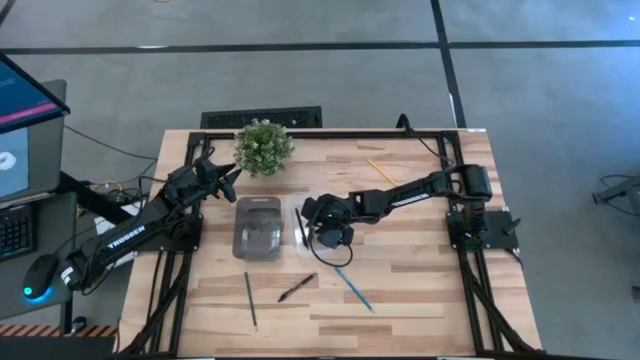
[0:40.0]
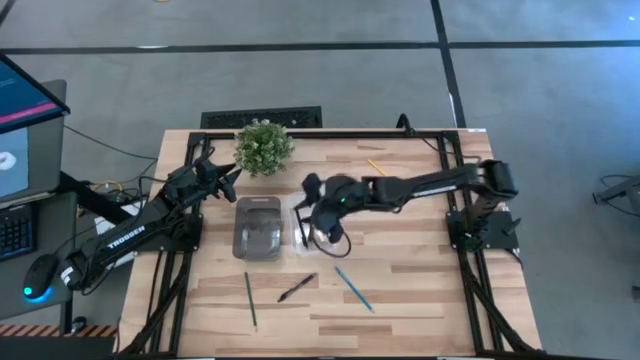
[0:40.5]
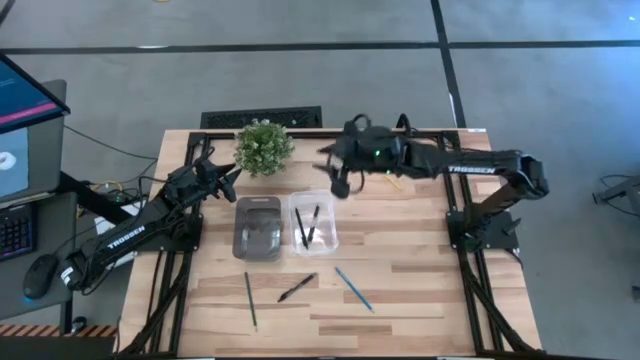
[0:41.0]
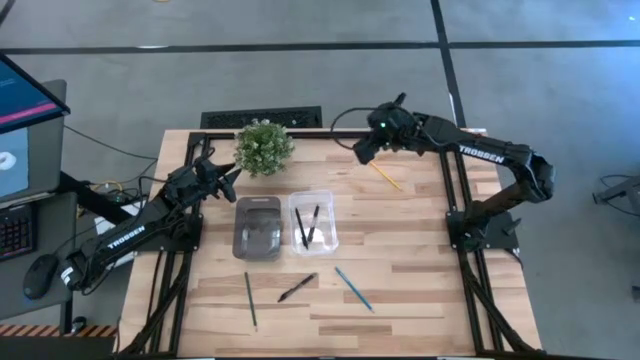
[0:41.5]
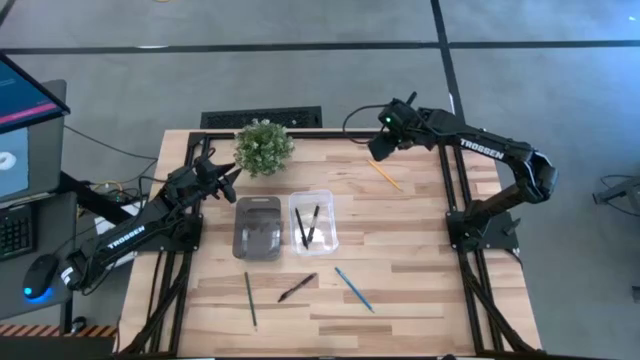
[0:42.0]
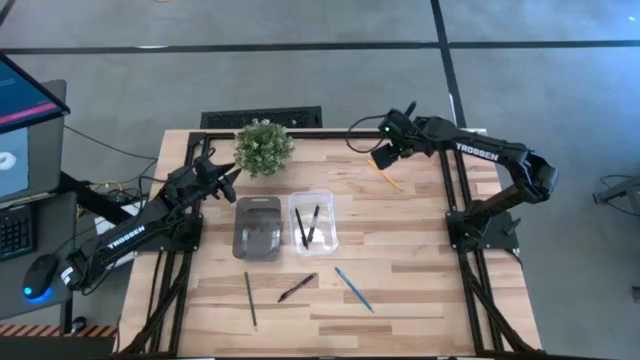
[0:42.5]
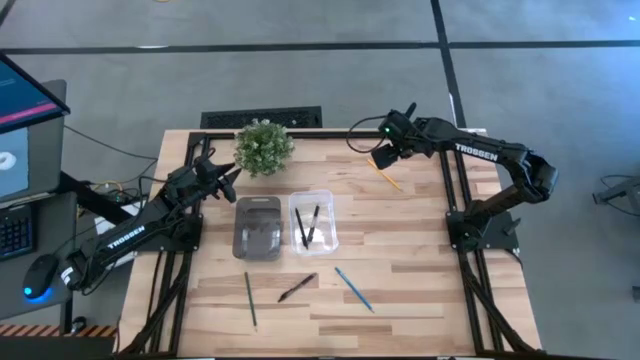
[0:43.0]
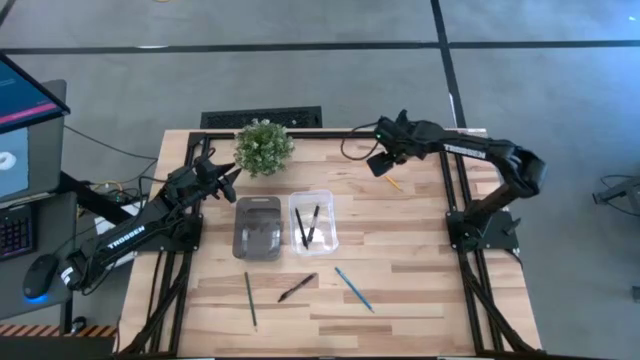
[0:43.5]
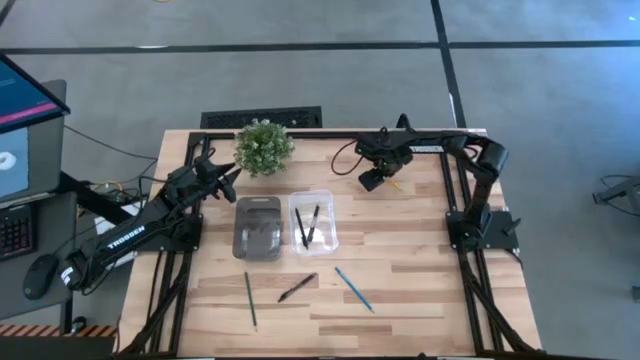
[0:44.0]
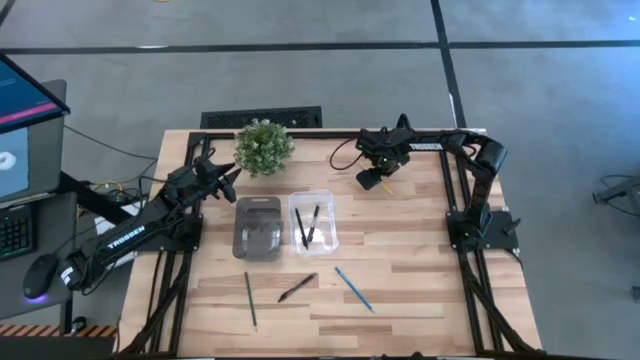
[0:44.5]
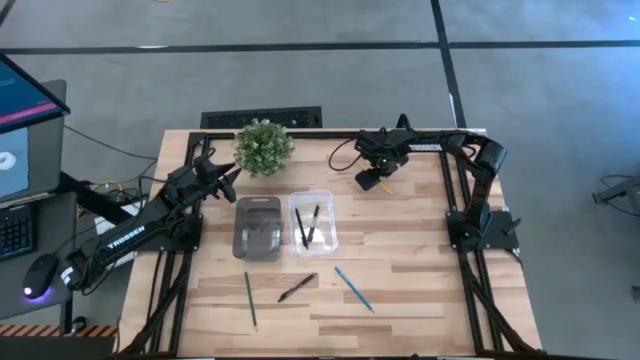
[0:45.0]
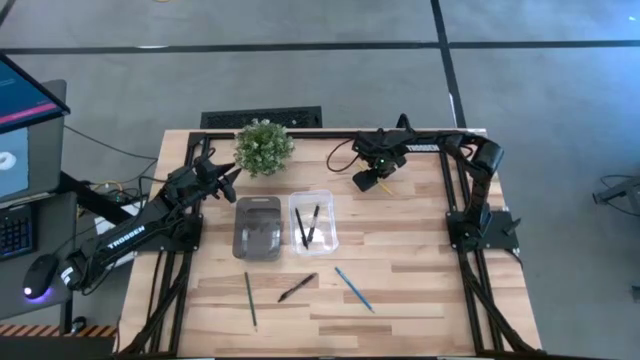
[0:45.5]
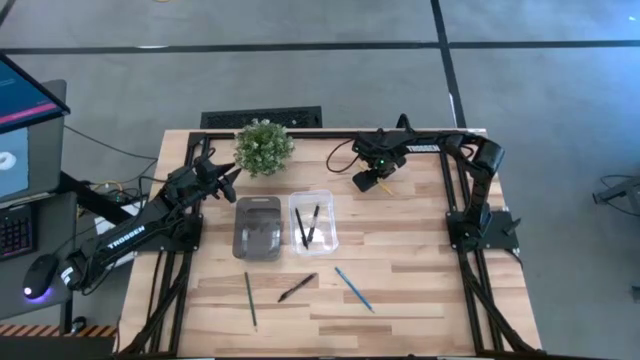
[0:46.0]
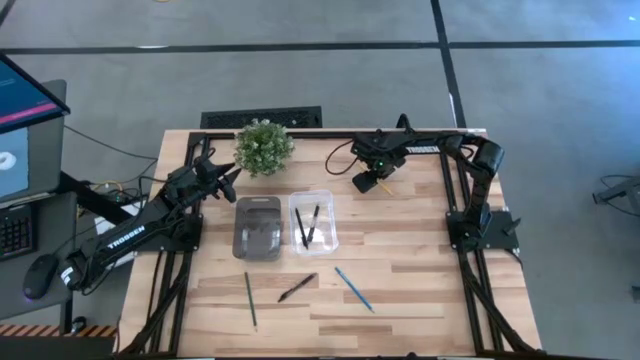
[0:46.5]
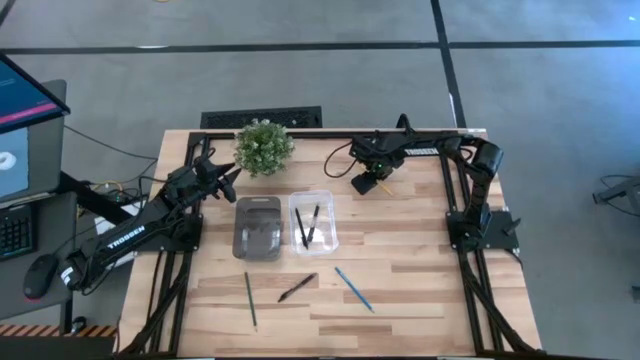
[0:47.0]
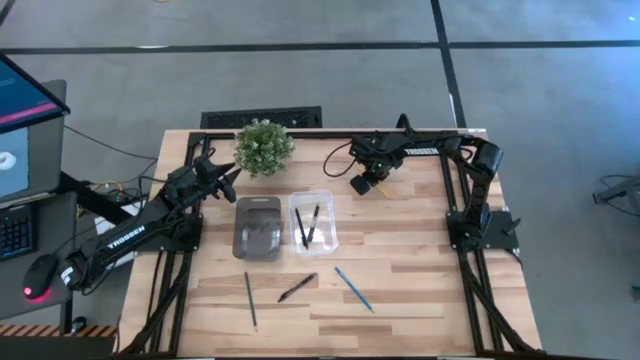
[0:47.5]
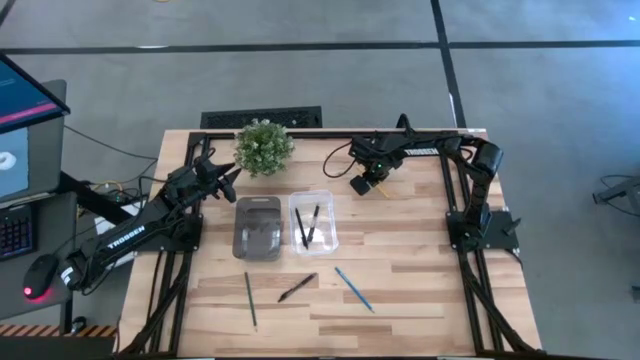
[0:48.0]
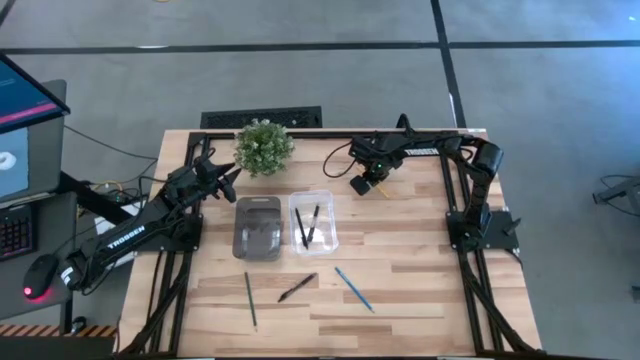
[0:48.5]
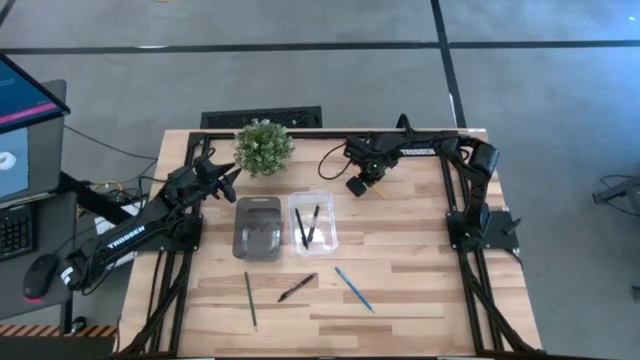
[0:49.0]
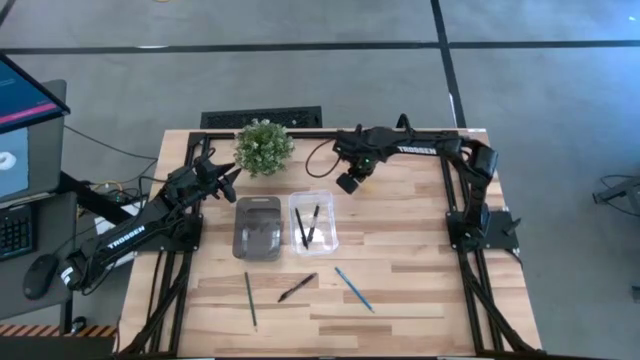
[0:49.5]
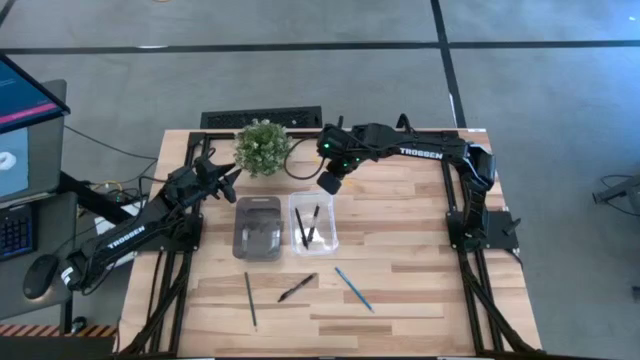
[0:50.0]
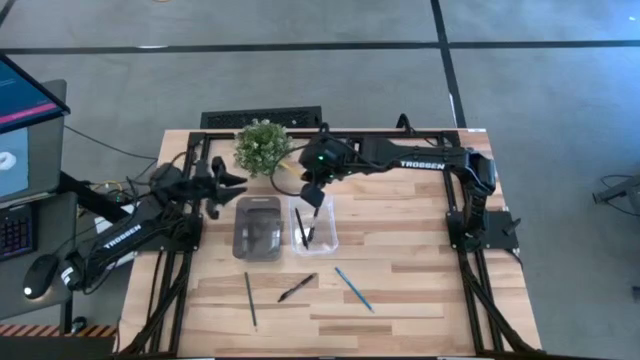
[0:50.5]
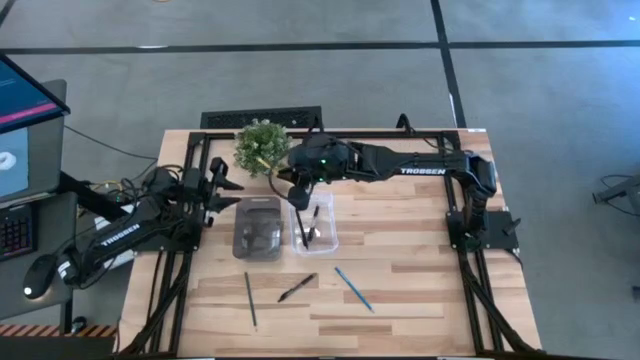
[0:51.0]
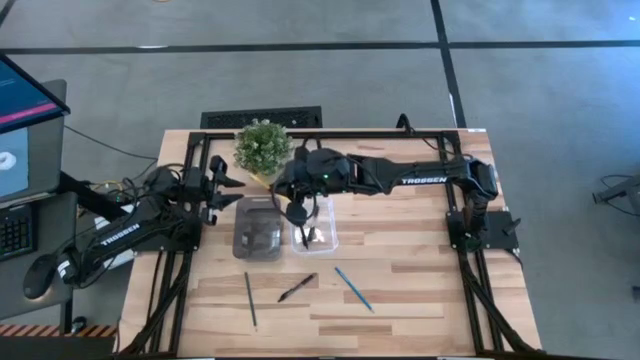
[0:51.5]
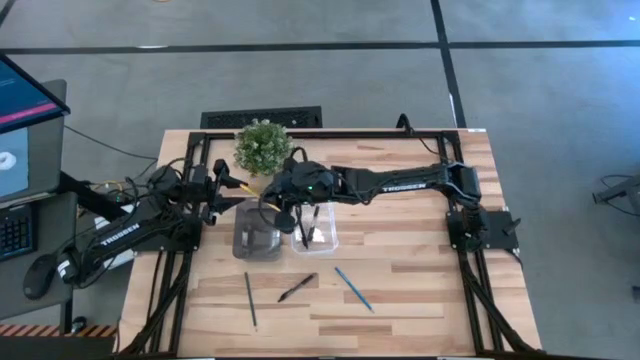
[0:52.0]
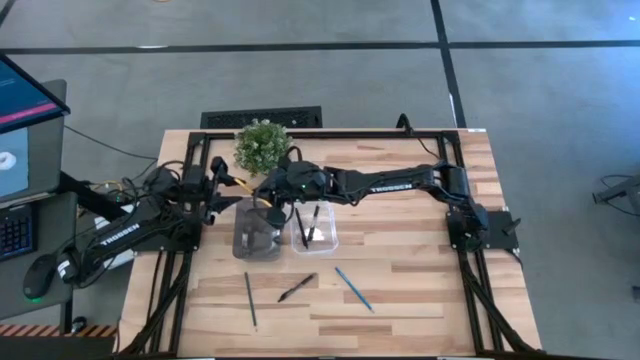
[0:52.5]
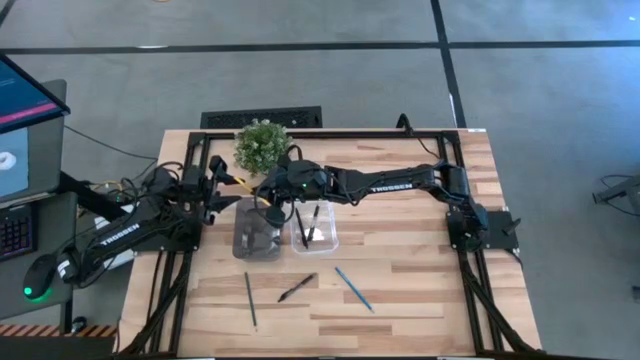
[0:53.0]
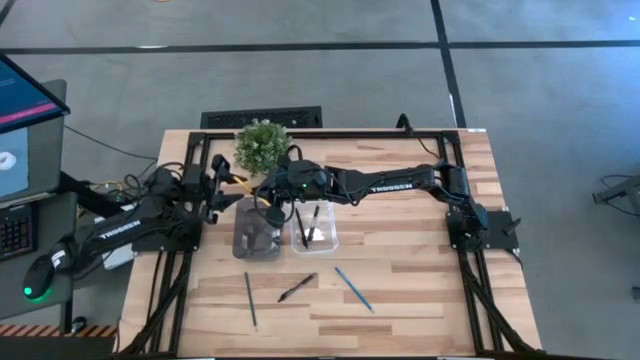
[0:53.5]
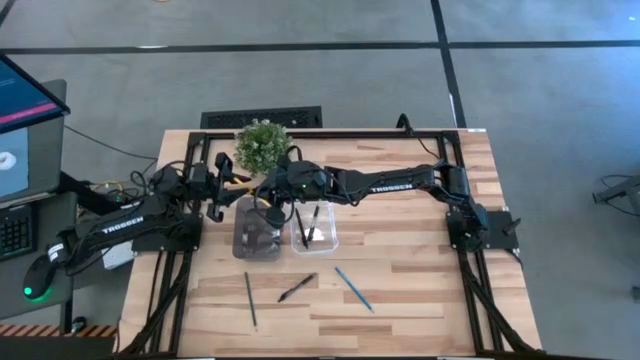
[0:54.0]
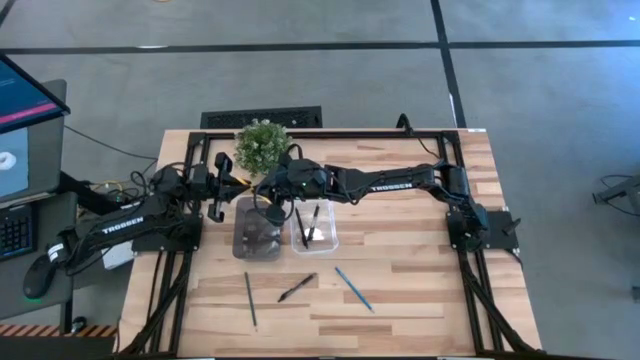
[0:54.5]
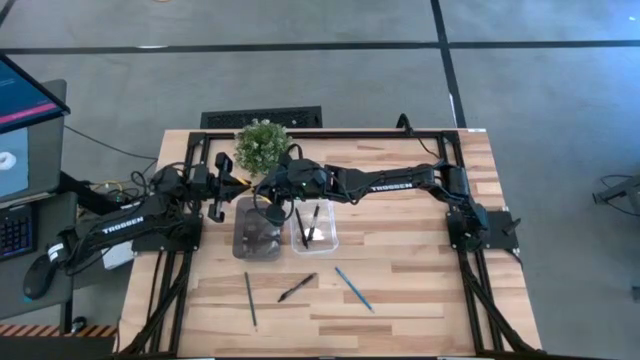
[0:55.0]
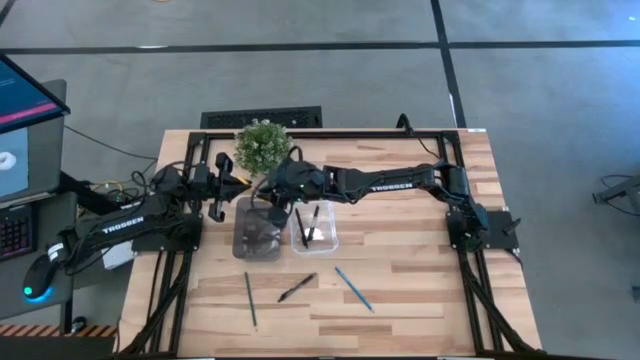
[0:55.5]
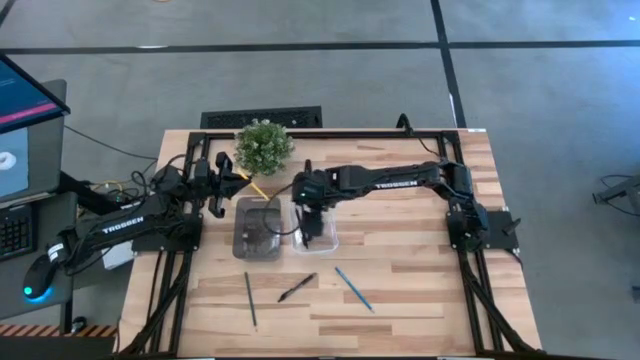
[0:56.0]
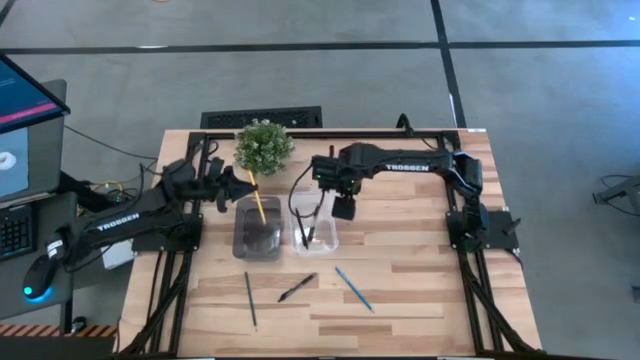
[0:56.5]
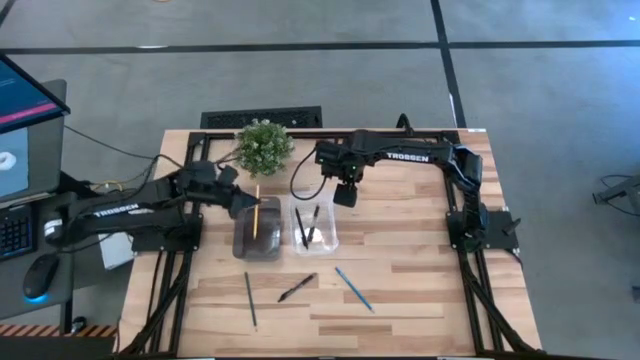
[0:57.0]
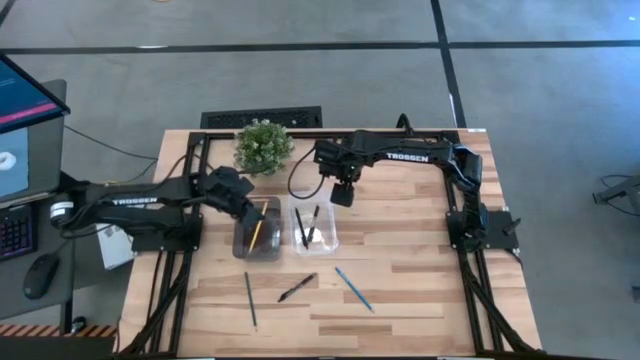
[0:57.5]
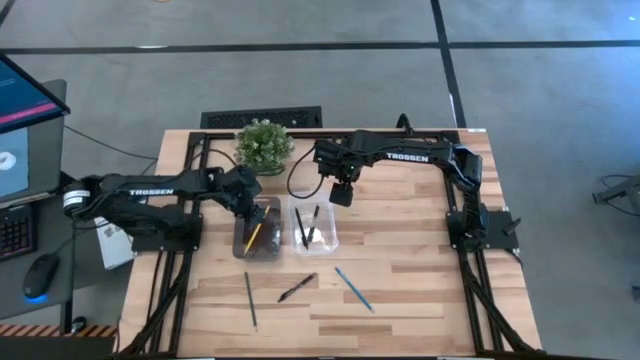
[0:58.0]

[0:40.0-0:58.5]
Task: Sort pens & pencils
Put the yellow pencil into the black bin

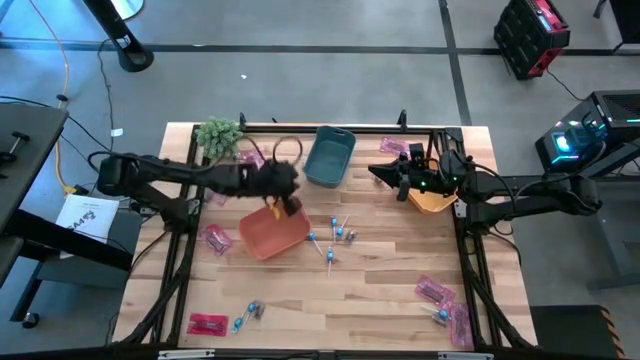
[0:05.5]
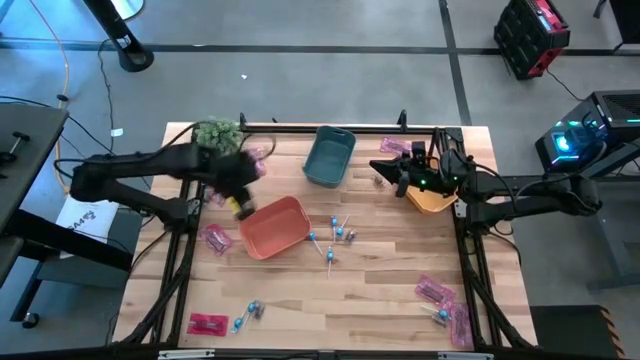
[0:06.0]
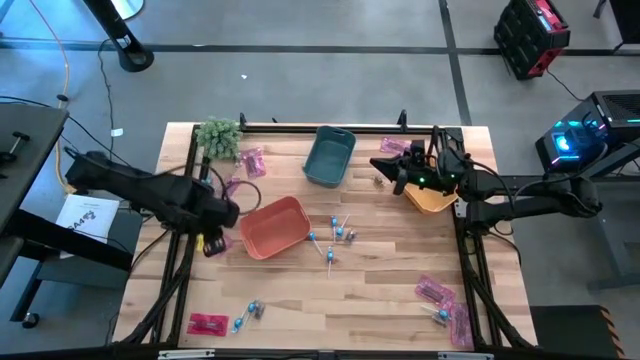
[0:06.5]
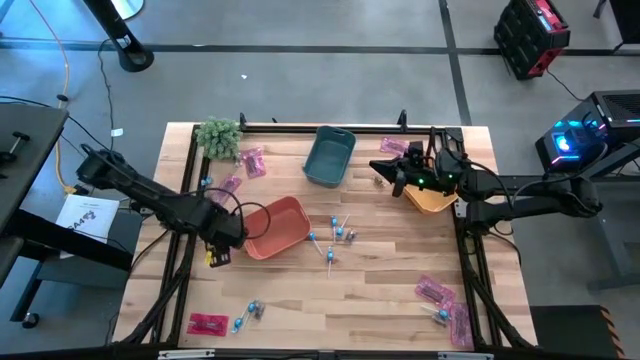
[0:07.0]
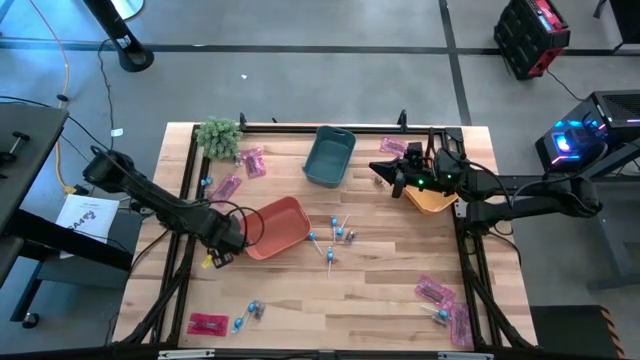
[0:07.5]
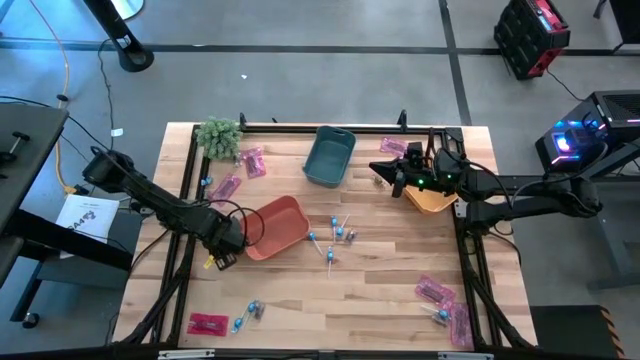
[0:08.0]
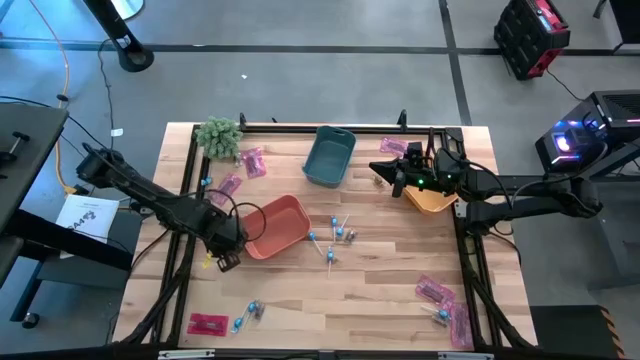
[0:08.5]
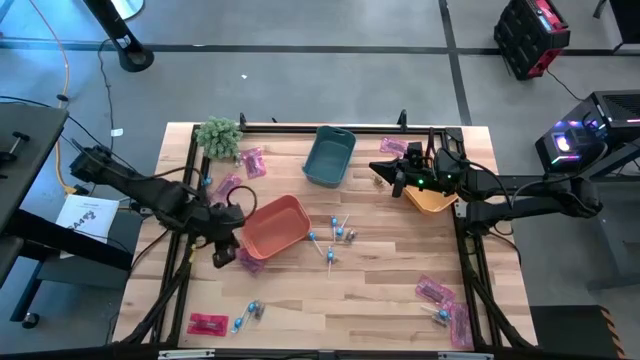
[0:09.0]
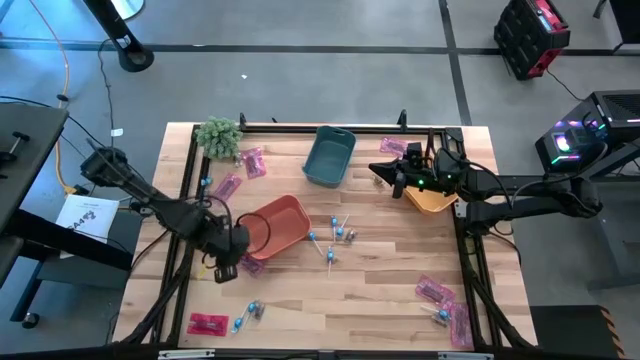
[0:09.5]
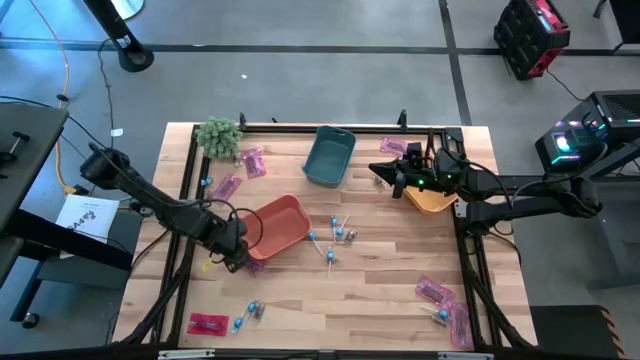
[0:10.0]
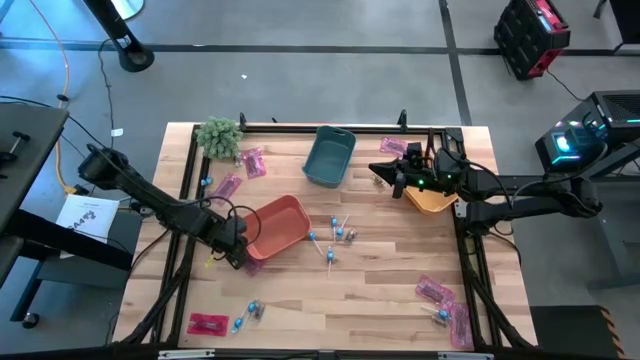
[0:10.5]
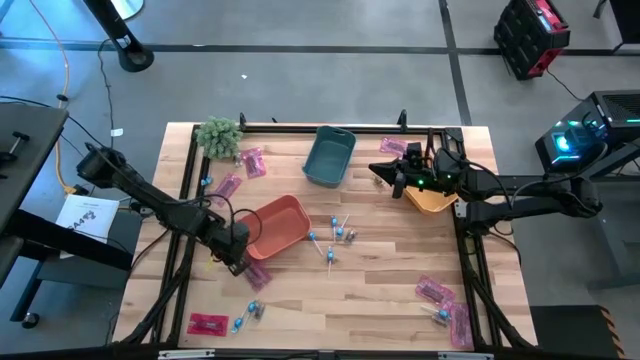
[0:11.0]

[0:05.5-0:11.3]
Task: Sort candy
Put the red candy into the orange bin
